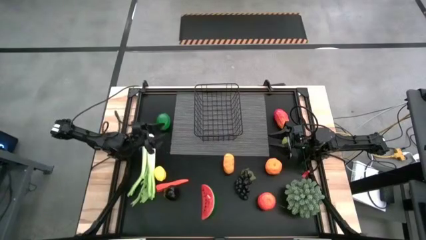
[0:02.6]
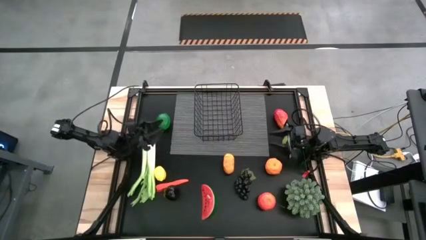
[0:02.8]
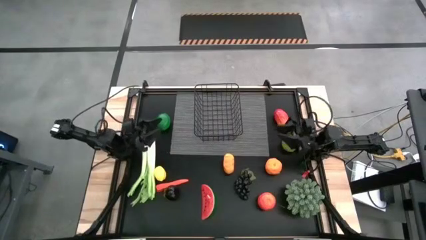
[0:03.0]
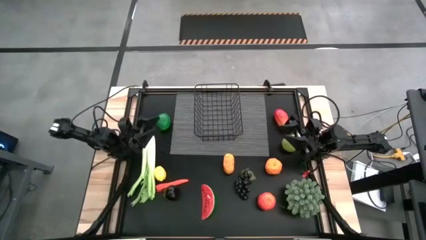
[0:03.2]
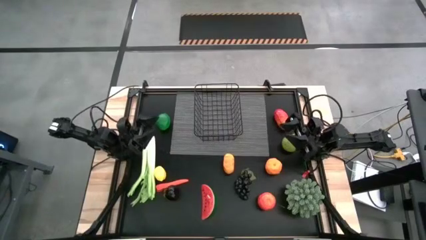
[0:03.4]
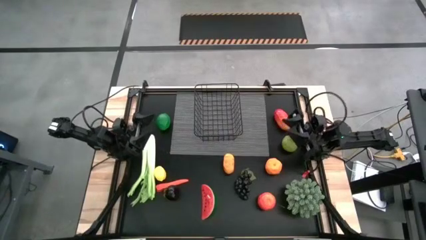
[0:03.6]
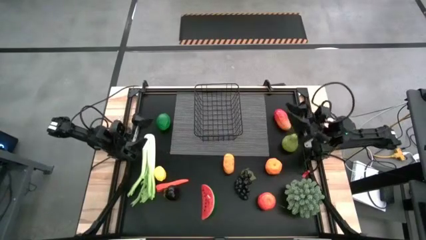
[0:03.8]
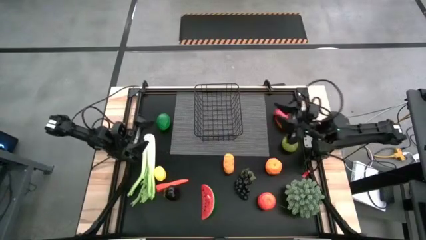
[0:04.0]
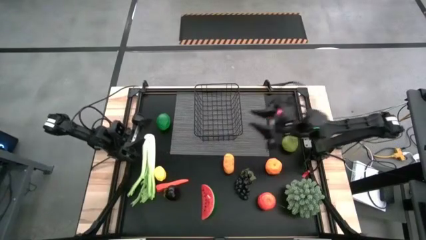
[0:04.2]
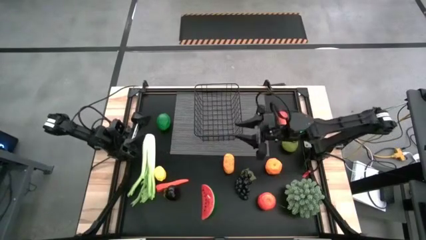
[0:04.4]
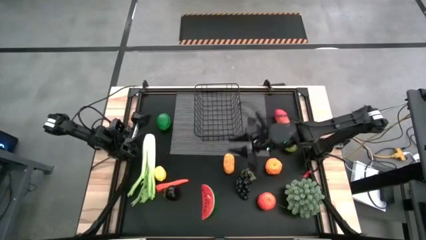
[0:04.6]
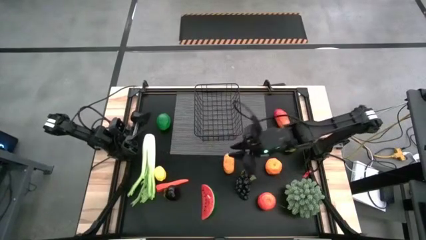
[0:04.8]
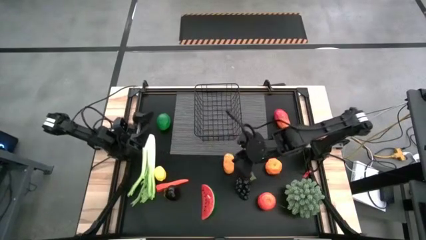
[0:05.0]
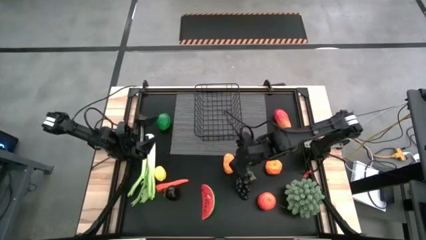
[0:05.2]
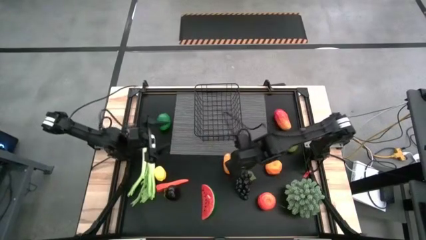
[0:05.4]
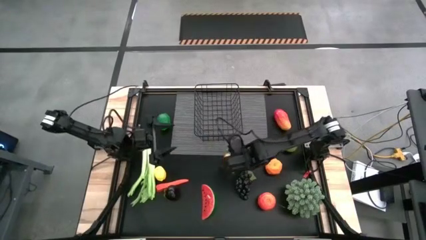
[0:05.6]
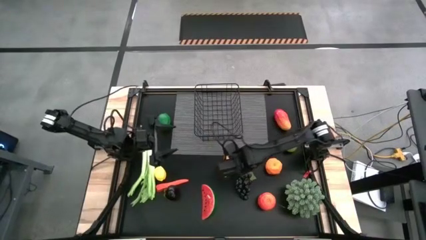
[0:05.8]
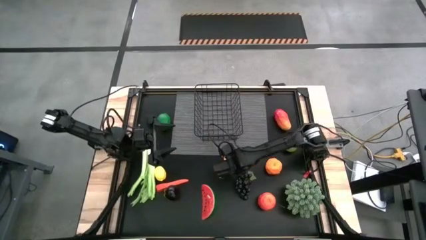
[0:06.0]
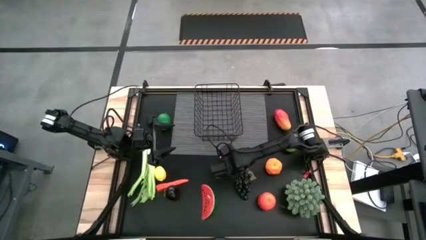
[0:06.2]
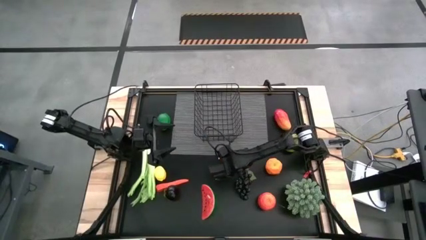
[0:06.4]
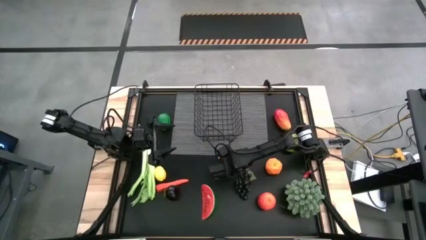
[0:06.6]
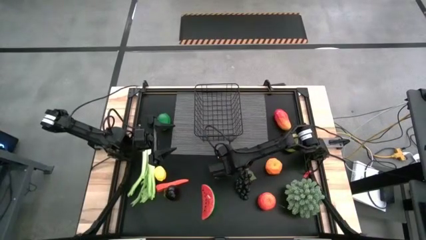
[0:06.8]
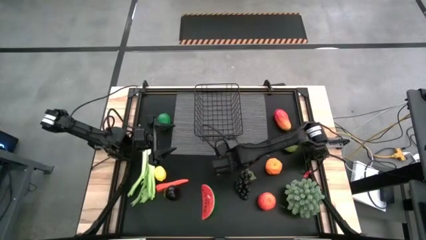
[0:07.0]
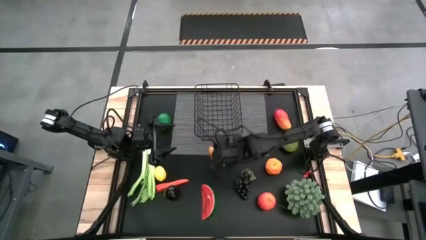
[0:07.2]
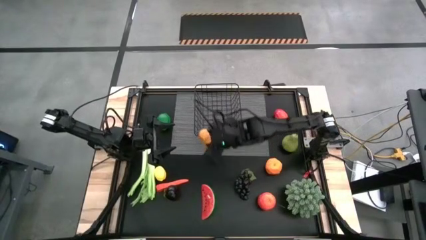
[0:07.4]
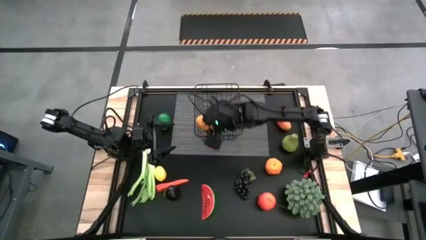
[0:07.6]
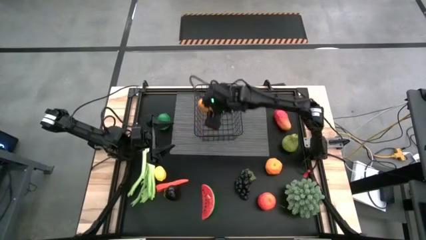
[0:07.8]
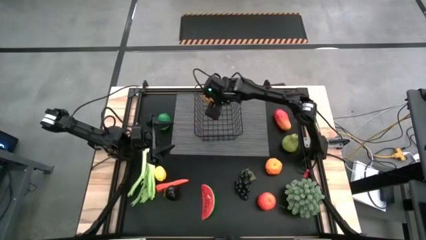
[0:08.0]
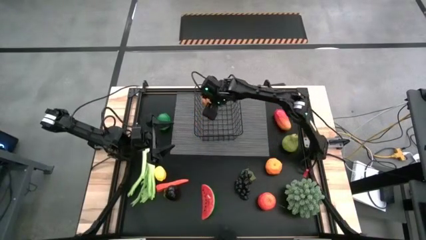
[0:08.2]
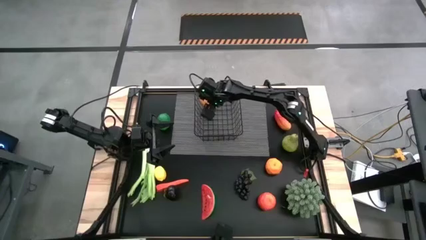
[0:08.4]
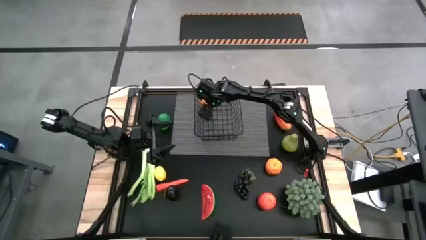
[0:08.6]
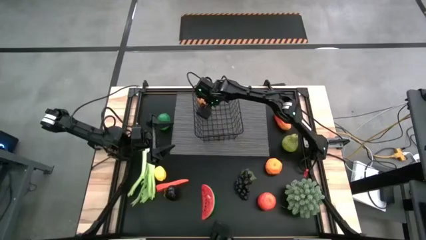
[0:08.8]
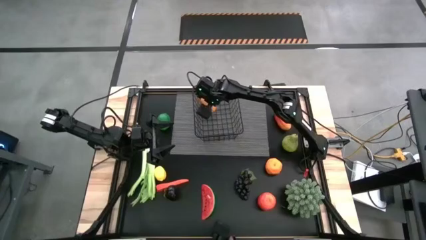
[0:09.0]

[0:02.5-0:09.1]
Task: Build produce basket
Put the bottom mango into the wire basket

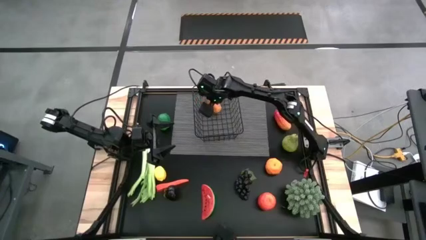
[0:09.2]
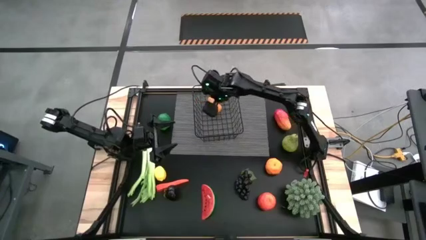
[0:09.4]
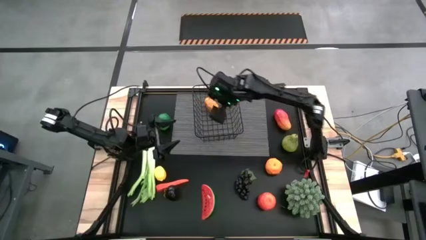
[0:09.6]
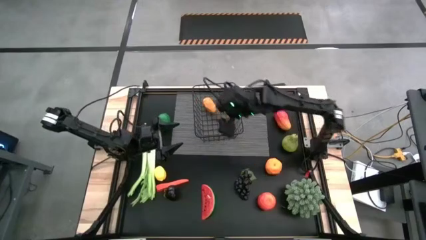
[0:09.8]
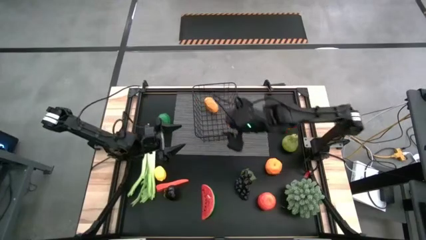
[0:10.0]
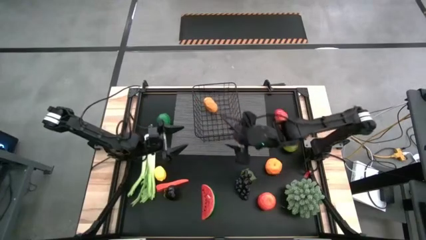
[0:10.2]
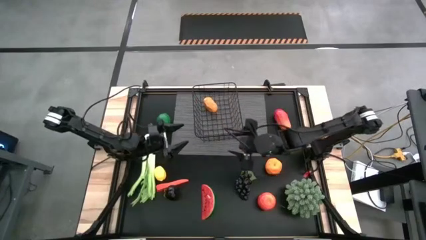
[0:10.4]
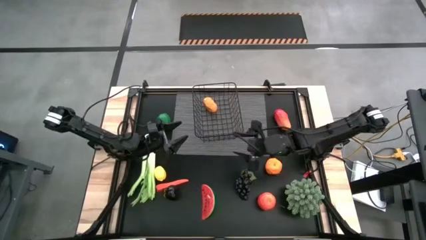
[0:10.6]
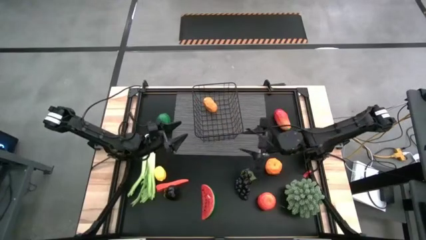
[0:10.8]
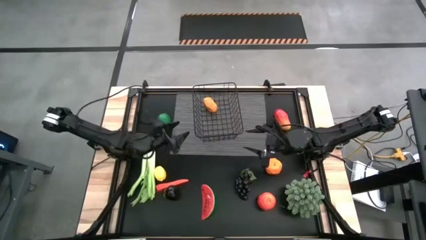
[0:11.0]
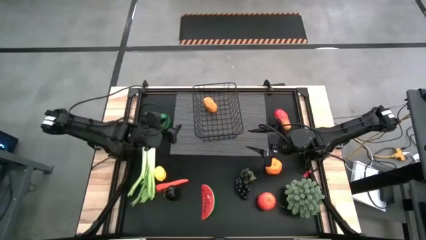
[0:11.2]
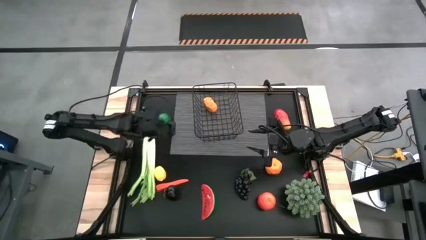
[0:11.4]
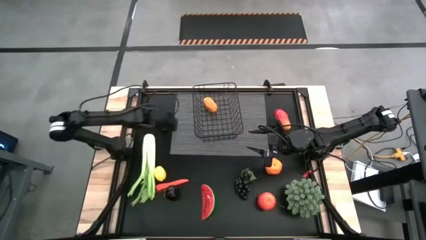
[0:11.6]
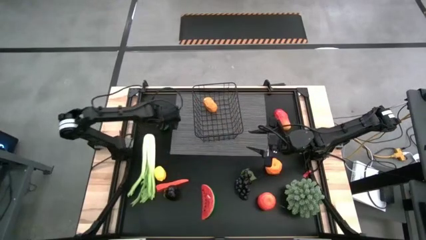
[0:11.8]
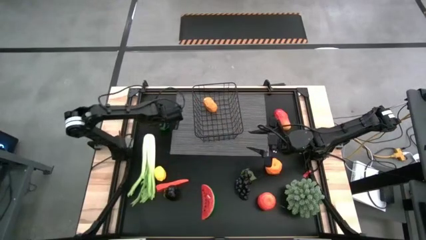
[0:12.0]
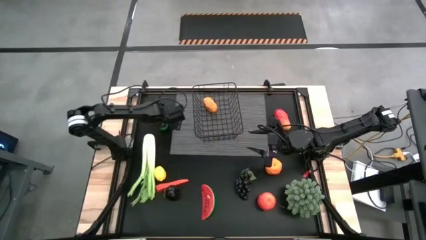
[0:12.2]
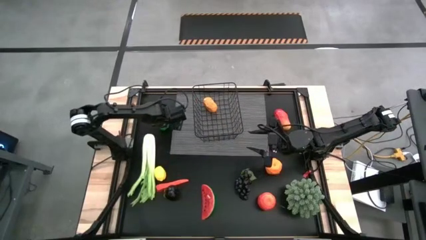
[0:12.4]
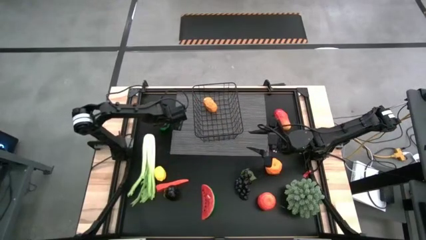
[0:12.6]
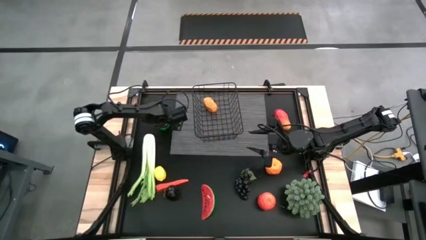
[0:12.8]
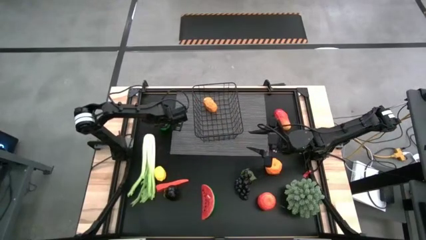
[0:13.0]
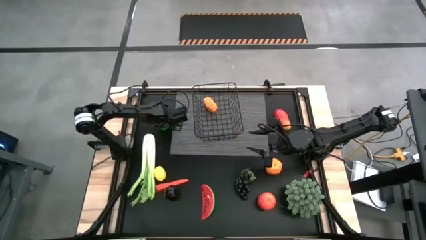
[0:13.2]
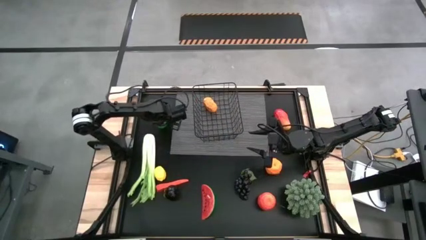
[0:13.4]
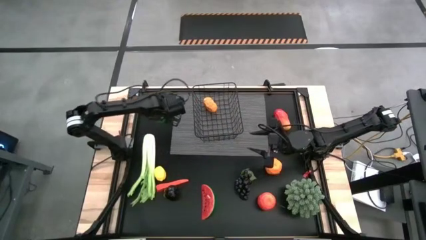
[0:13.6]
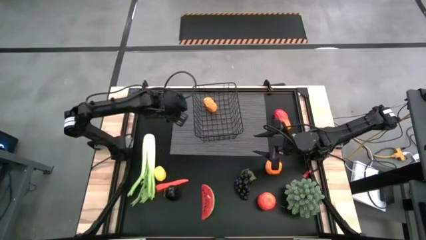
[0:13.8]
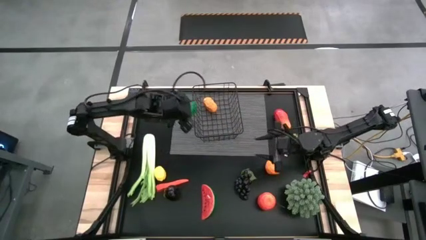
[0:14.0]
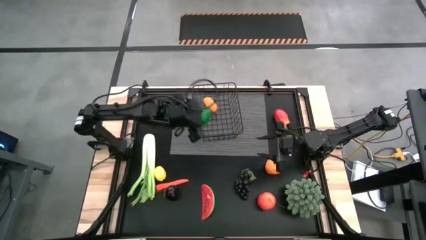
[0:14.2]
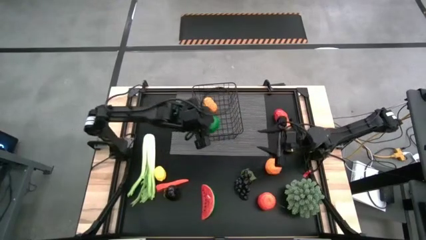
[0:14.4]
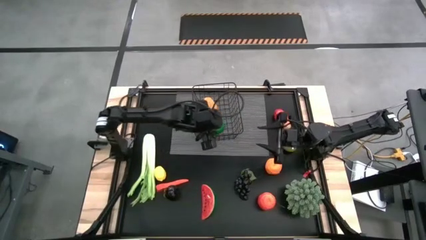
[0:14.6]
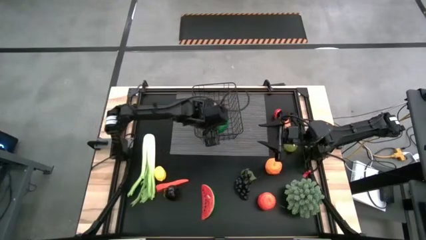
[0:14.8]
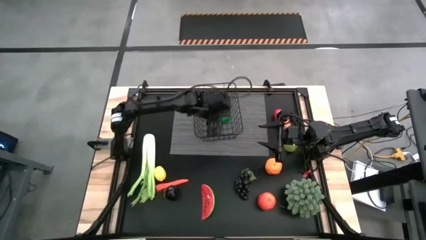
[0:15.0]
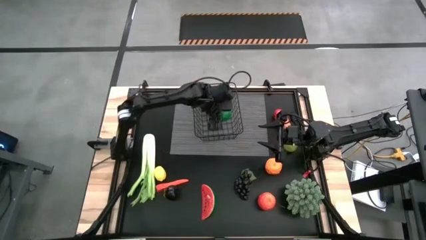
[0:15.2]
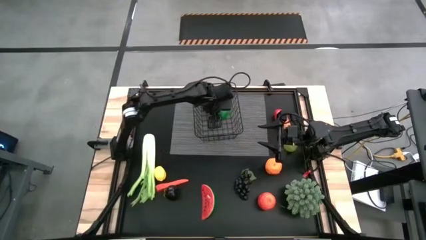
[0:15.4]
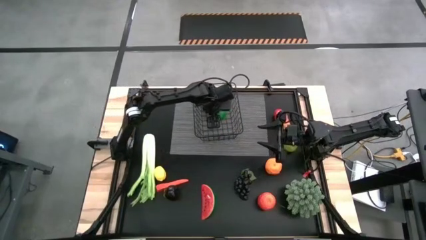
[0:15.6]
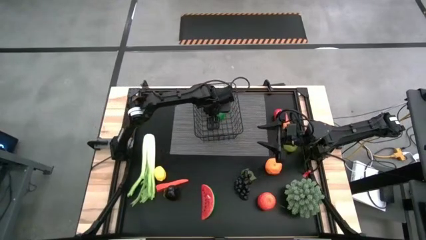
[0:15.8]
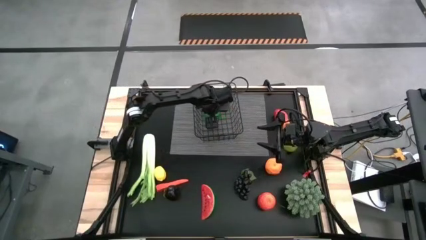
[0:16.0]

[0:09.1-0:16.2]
Put the lime into the wire basket

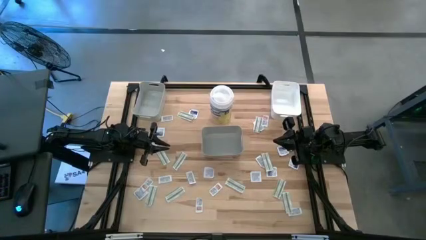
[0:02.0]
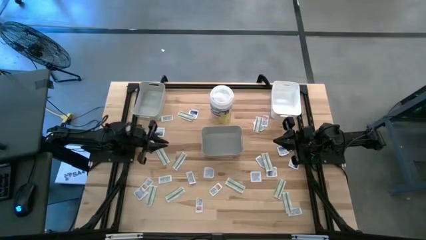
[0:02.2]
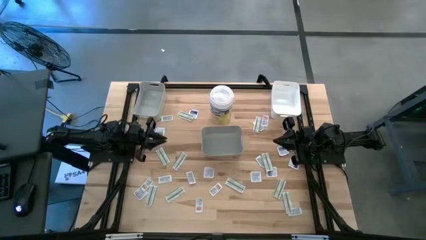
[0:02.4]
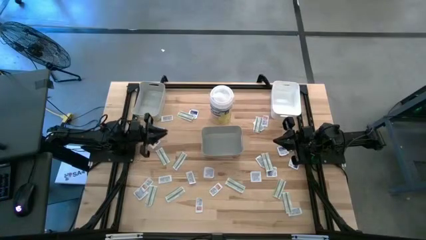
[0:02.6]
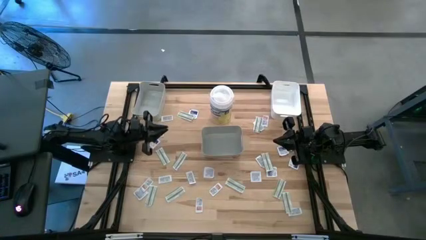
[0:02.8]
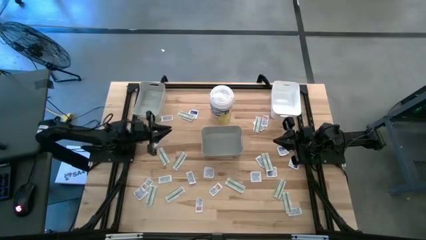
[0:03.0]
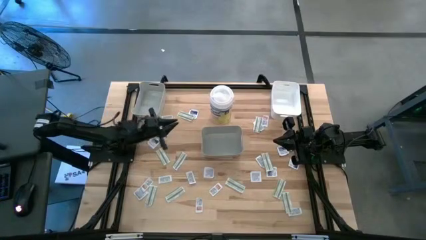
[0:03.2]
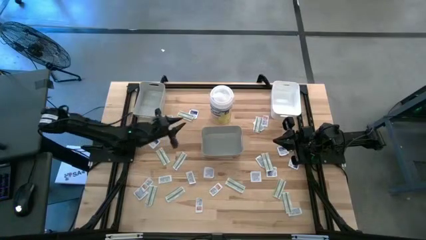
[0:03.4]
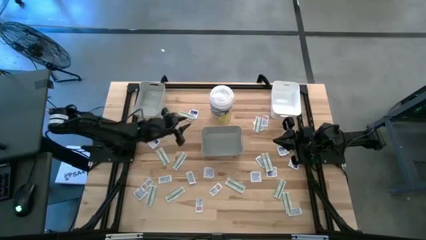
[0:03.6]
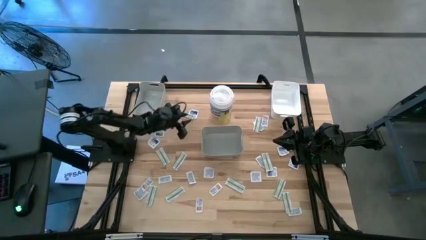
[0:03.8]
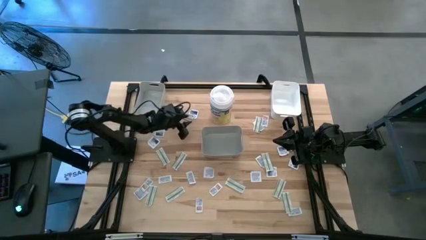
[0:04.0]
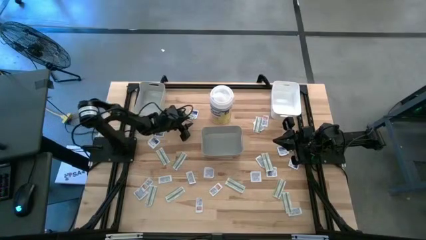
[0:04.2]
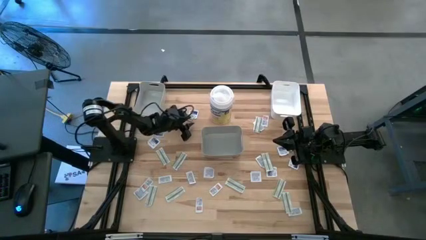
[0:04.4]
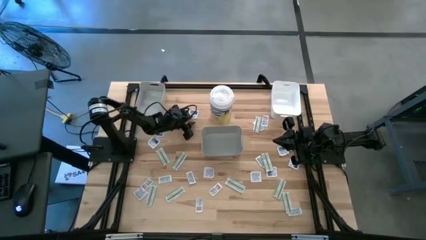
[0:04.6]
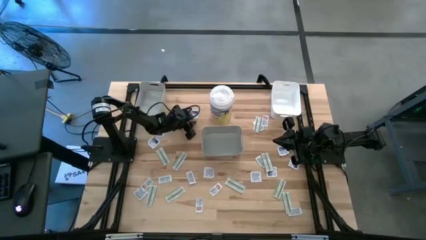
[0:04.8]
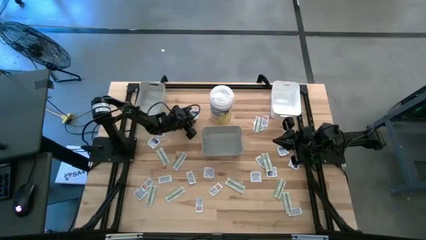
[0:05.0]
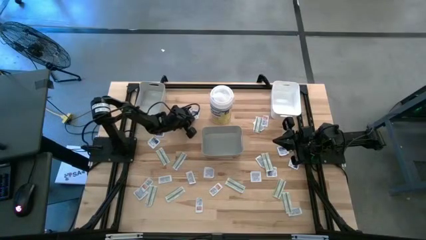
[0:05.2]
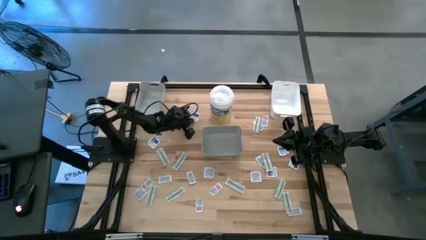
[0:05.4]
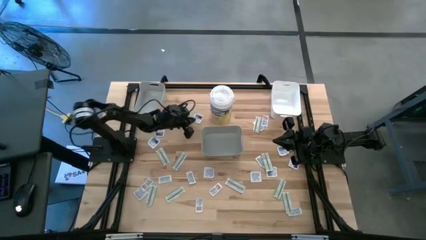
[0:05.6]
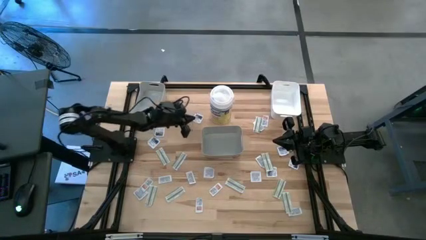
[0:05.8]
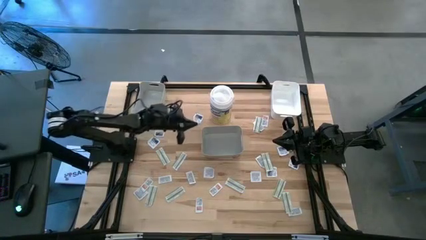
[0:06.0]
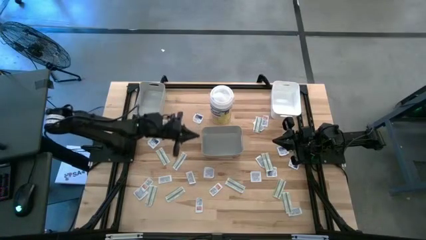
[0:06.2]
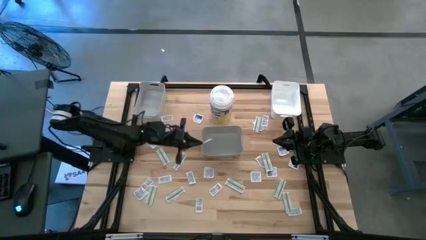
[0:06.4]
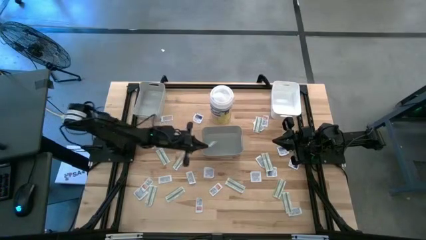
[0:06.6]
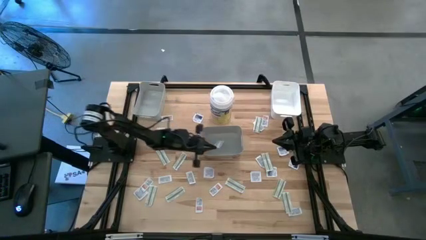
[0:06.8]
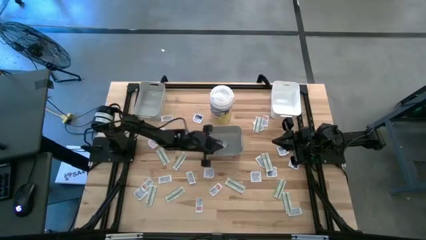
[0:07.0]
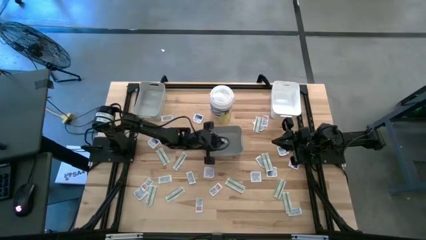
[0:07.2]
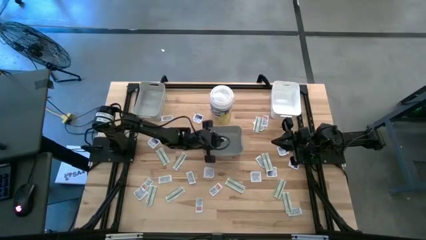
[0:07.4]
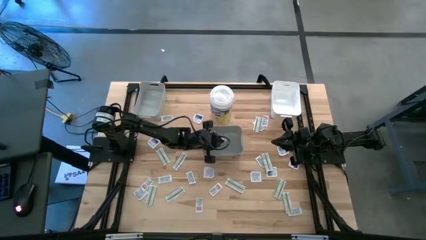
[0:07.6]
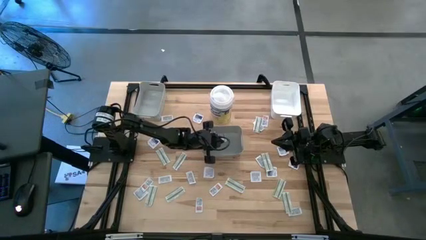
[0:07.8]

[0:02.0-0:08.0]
Task: Pick & Place First Aid Supplies
Put the bandage into the bottom gray bin
